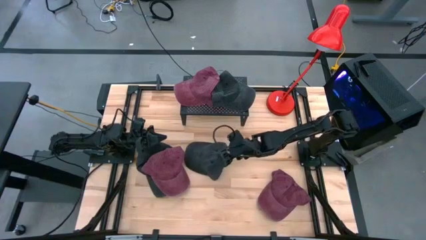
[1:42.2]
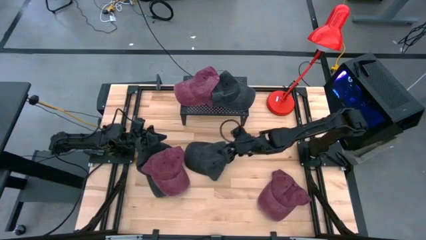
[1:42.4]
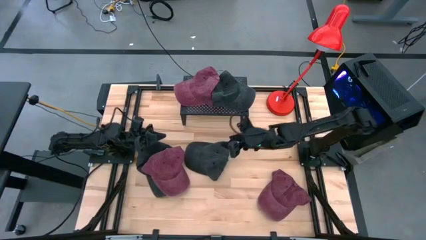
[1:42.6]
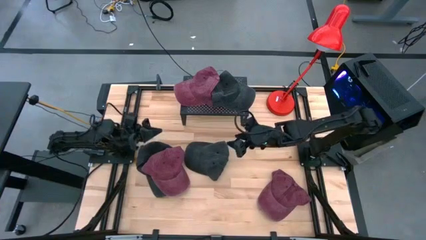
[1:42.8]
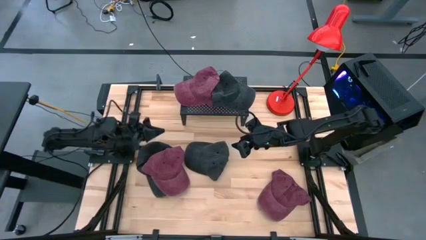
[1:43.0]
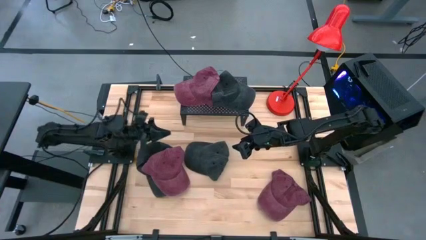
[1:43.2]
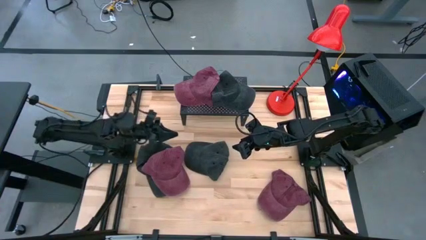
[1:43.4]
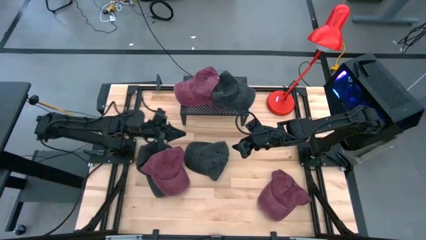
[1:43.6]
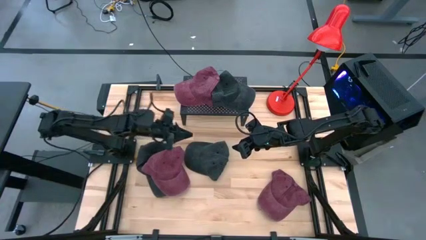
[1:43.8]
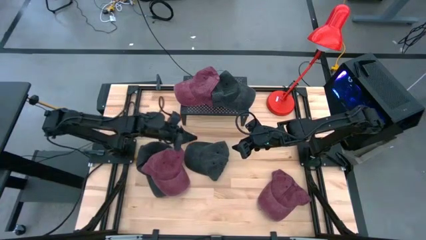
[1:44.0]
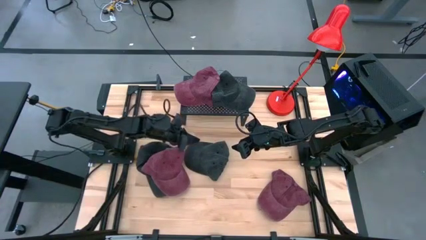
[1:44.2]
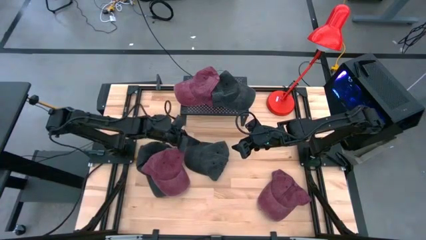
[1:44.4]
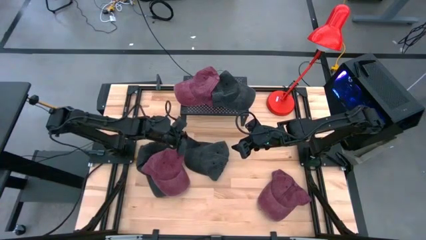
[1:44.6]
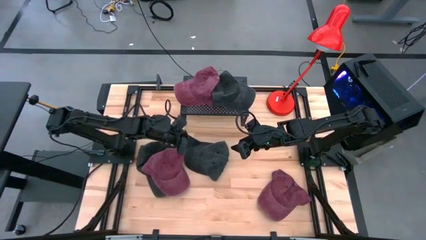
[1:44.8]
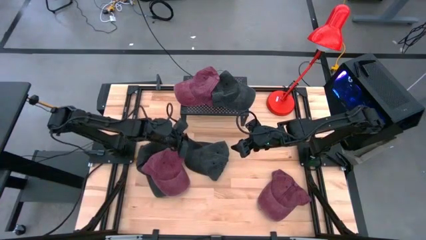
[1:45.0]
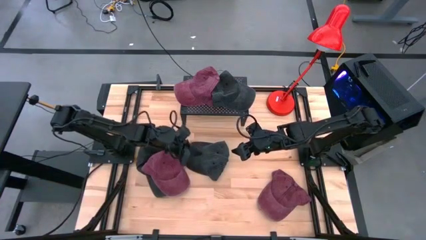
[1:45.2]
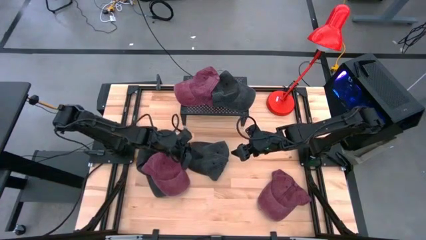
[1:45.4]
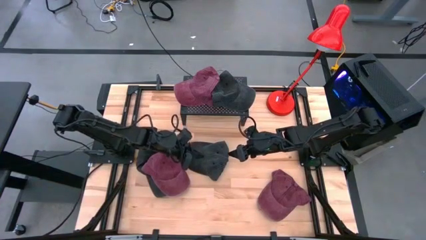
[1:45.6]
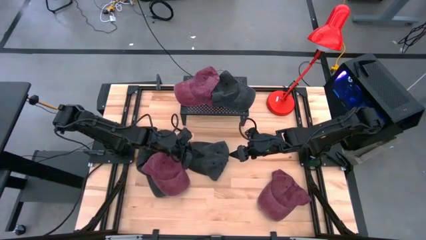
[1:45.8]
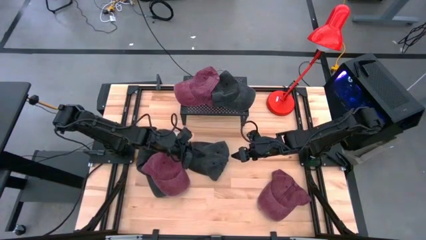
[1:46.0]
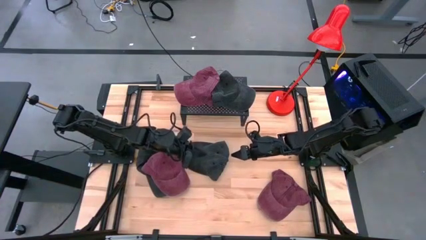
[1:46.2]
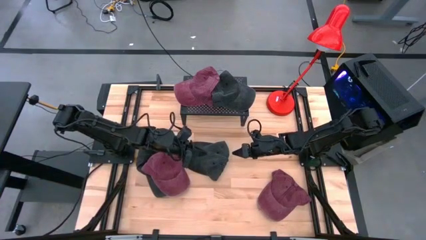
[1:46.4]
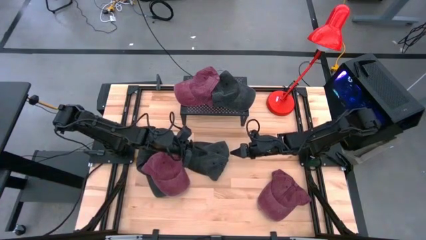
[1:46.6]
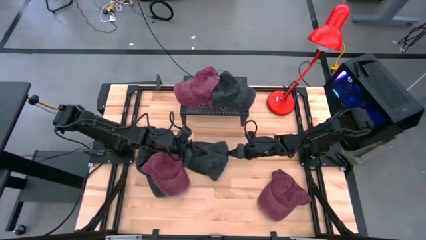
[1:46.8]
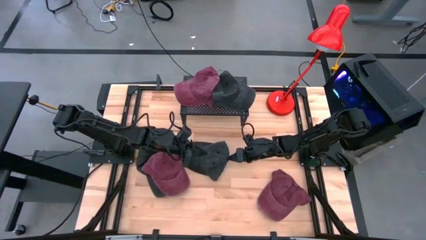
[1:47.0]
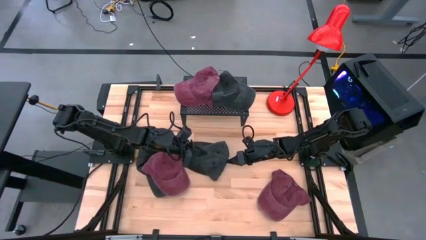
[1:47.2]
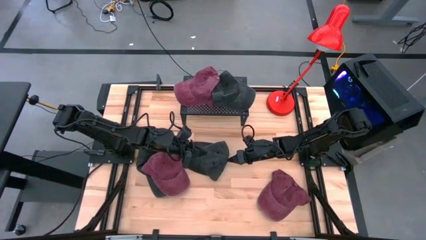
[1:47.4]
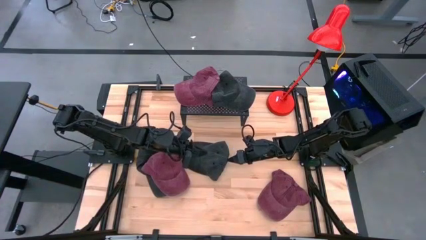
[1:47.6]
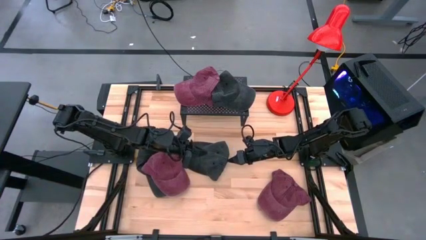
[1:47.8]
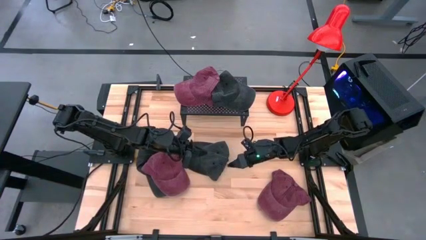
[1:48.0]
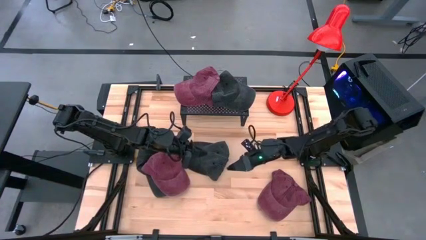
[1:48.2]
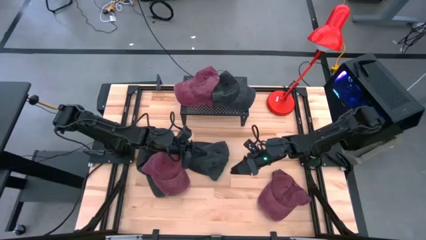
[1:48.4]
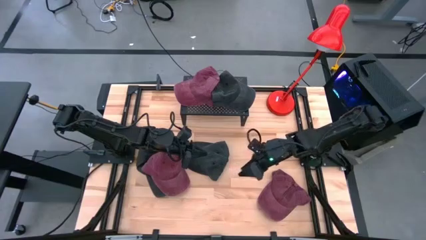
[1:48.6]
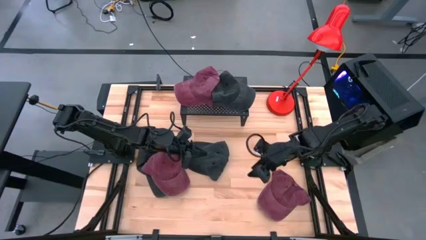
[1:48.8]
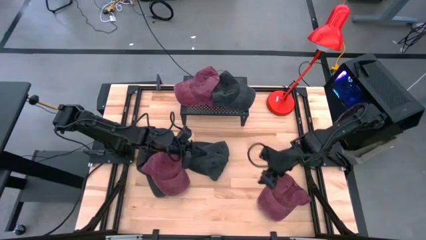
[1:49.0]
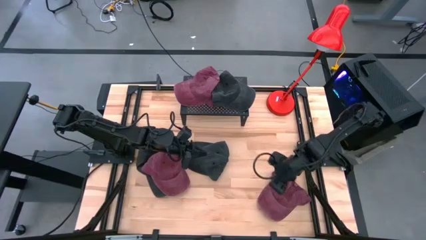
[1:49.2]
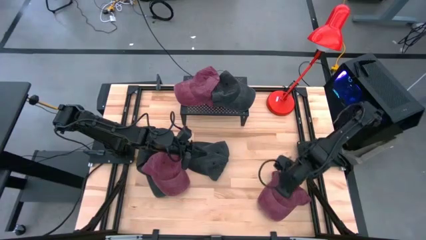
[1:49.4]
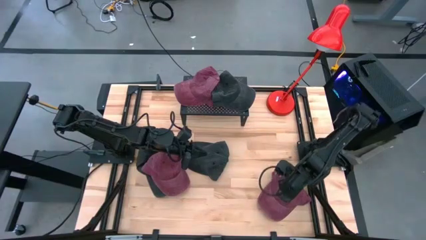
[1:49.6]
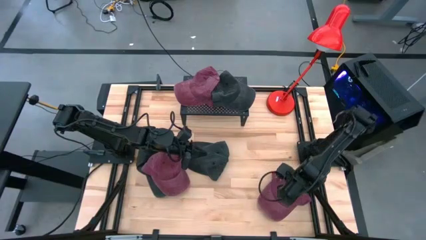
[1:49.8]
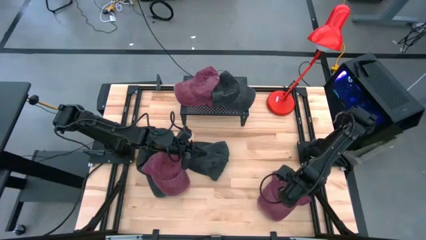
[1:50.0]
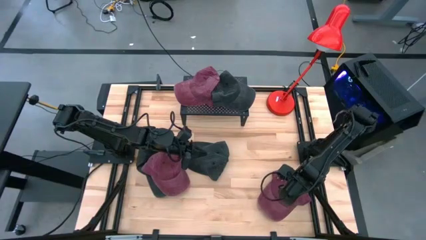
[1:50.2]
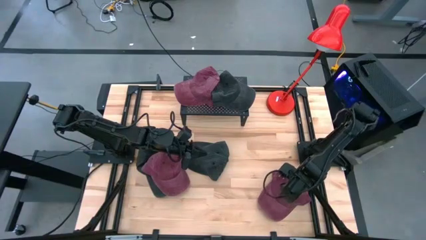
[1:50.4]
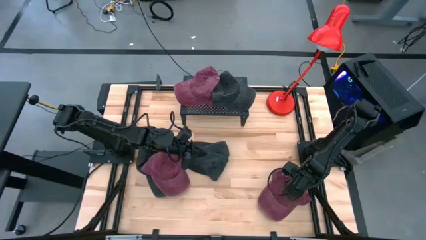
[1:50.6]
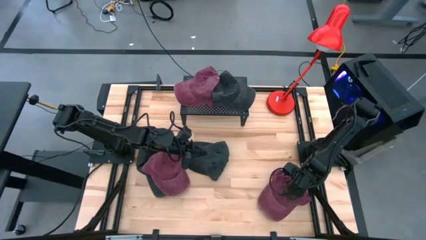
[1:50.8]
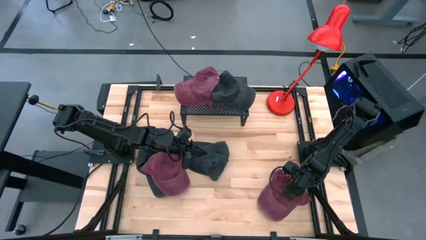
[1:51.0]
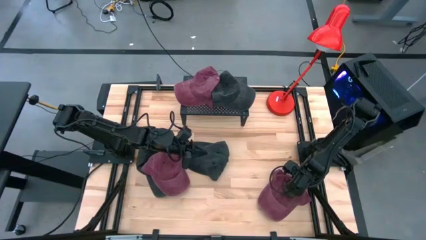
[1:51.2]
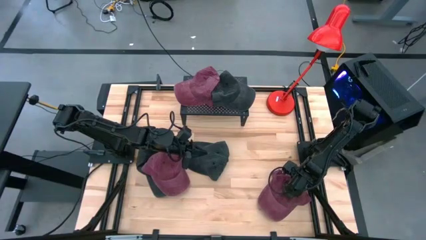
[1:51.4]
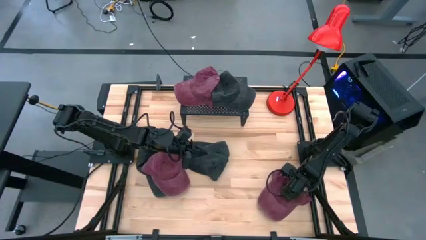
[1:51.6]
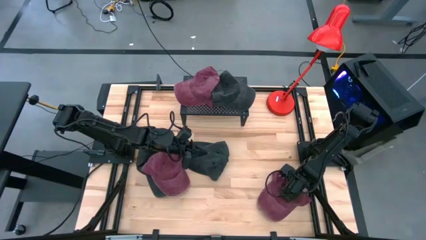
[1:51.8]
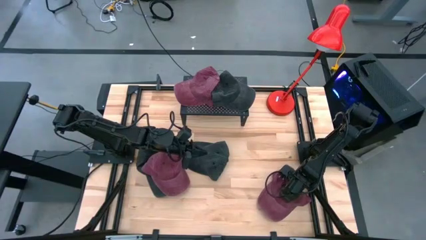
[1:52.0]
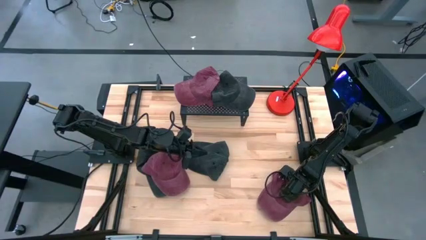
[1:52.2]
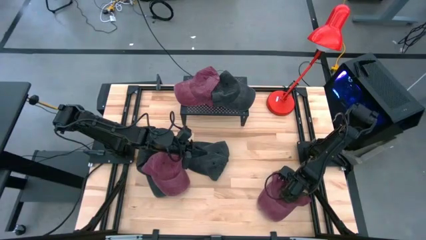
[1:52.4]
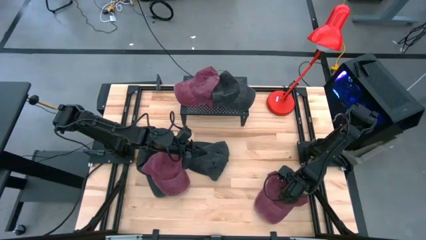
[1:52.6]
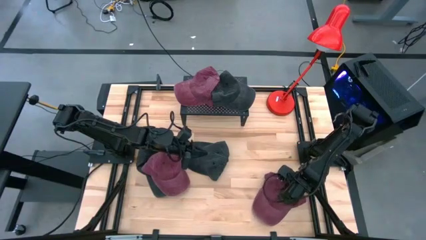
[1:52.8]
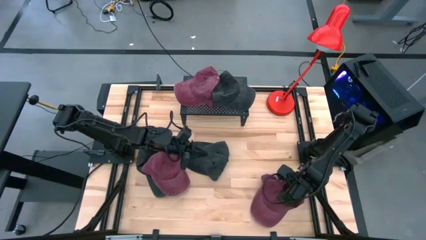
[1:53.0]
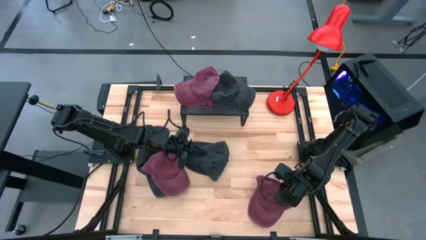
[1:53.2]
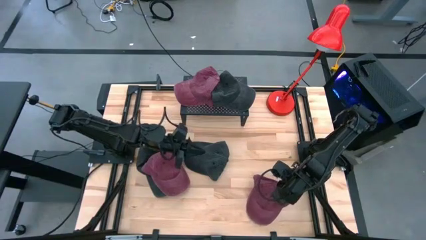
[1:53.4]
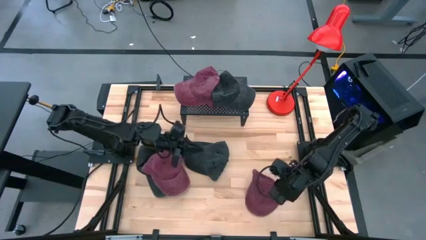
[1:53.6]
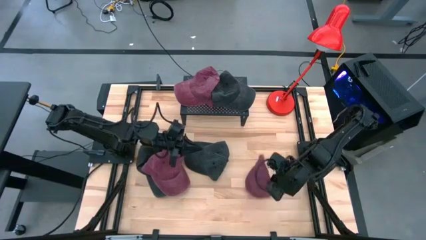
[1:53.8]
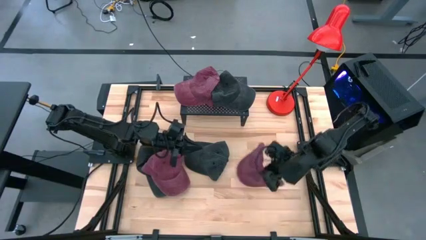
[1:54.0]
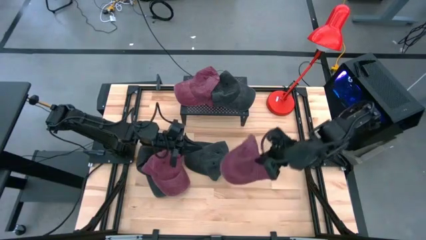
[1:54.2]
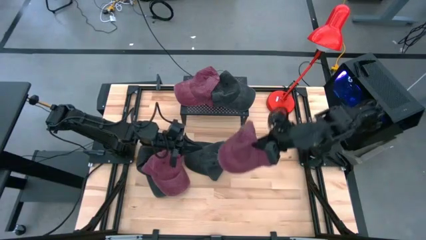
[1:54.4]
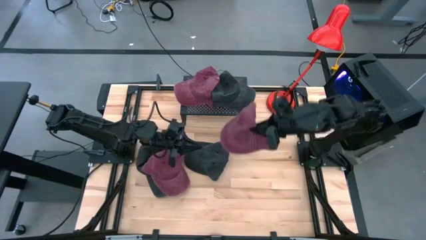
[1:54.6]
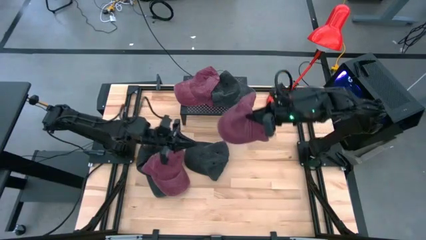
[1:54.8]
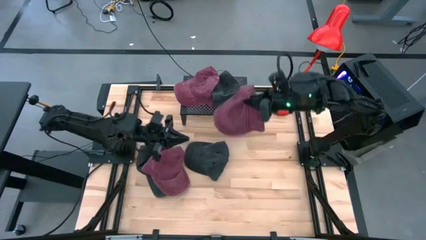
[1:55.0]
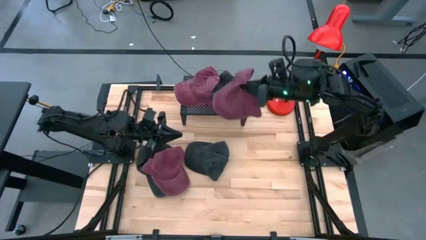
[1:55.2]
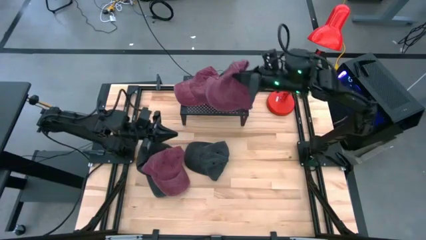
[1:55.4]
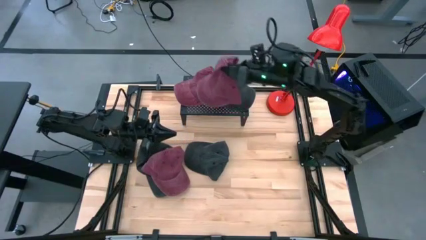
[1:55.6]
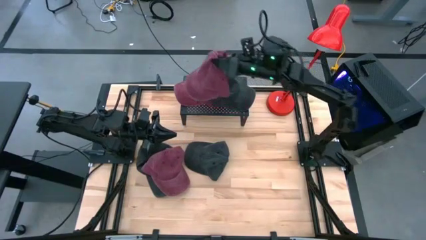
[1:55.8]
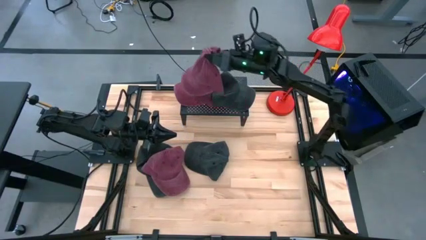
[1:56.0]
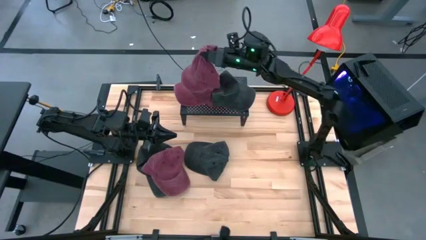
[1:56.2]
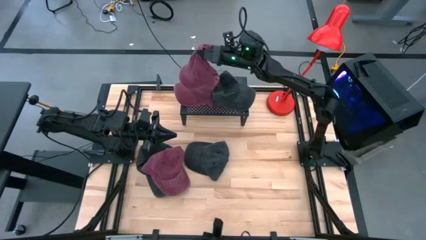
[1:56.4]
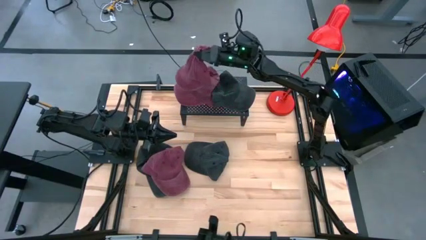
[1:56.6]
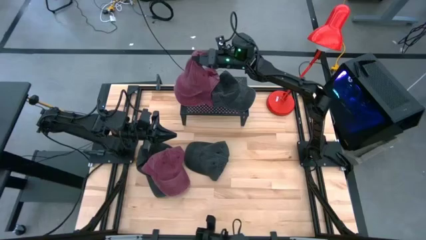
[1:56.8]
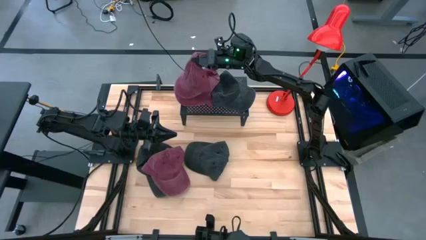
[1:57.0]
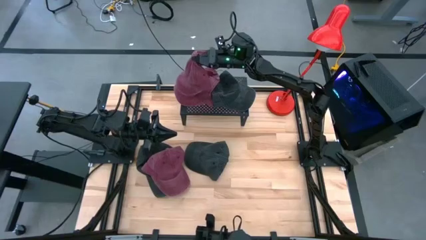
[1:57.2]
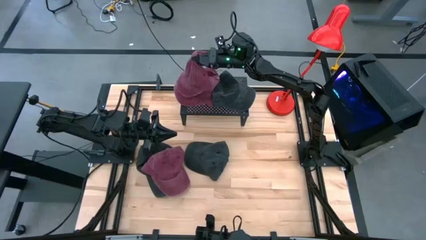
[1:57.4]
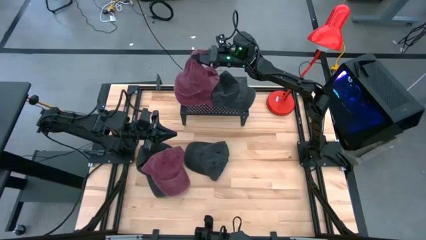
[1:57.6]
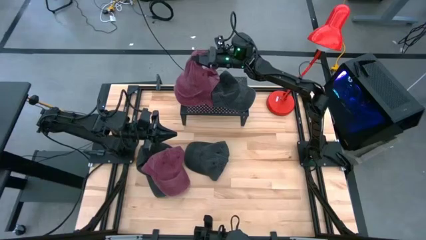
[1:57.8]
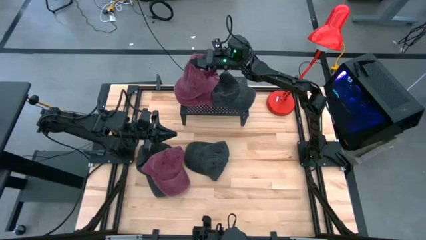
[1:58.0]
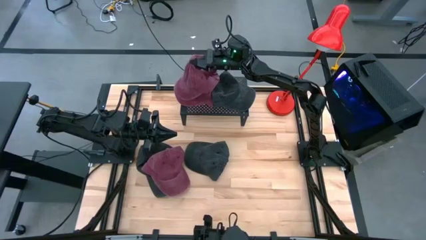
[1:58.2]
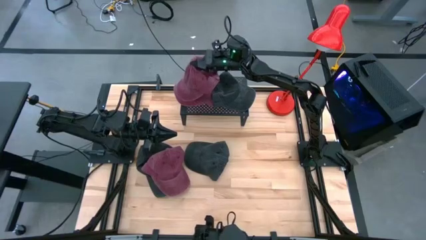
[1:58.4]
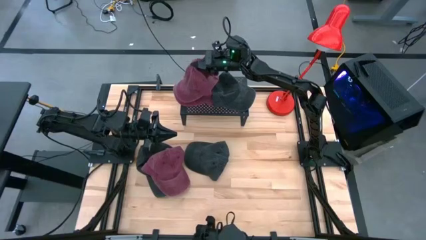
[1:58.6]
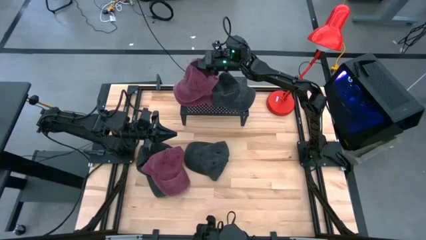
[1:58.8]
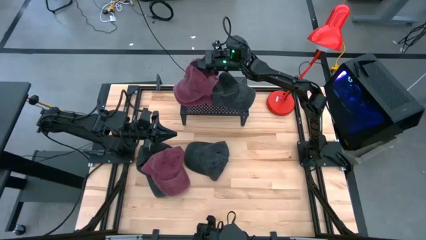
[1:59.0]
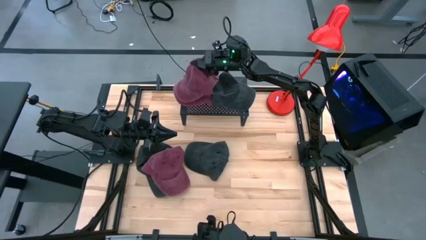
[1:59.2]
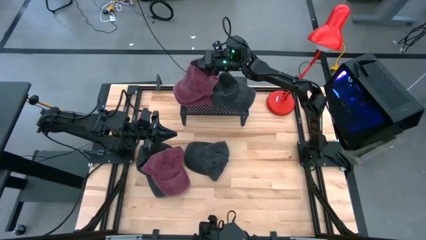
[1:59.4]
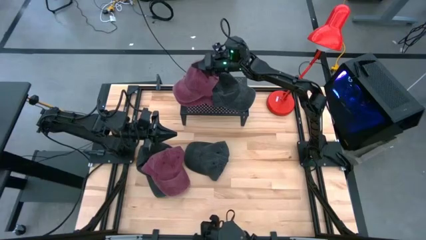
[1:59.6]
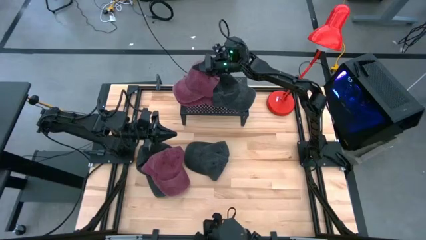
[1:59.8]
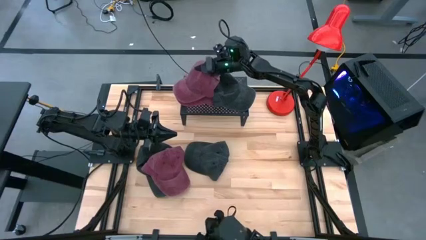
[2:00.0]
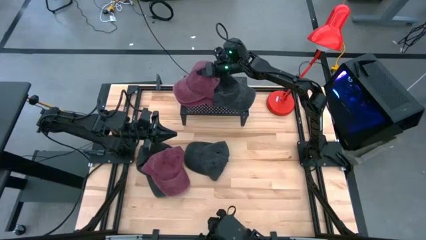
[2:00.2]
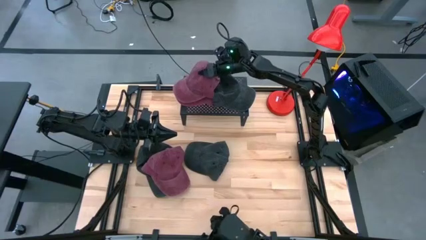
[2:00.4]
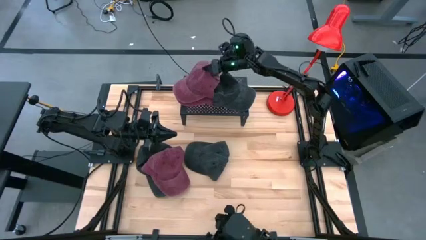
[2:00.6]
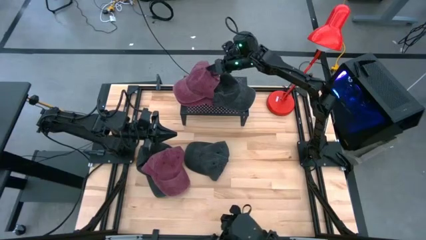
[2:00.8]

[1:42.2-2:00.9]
Task: Pick & Place hat
Stack the right red cap on top of the red cap on the shelf
